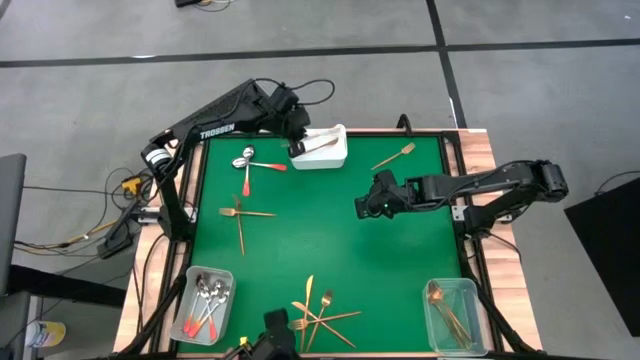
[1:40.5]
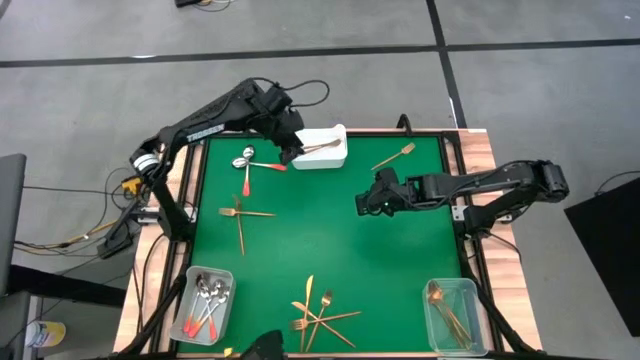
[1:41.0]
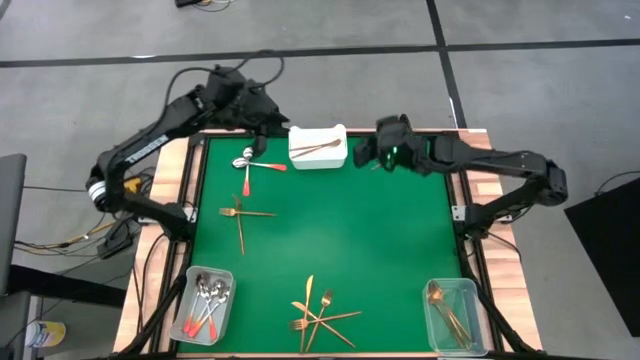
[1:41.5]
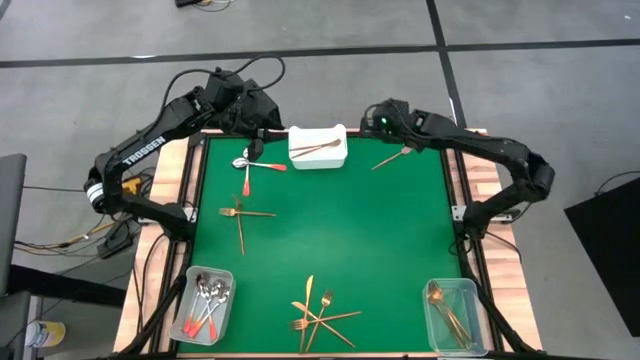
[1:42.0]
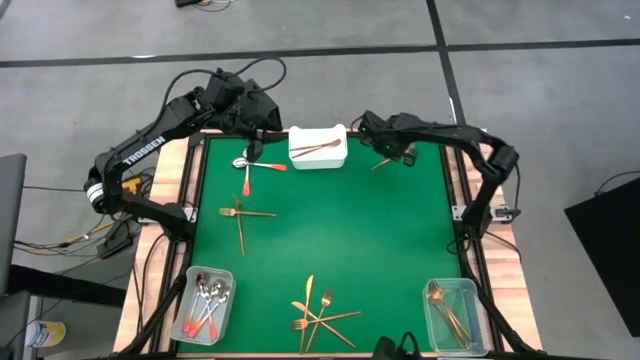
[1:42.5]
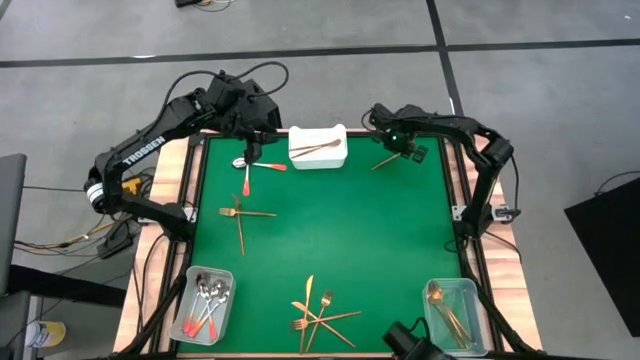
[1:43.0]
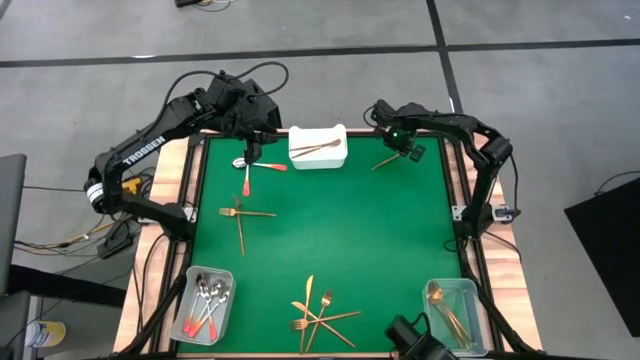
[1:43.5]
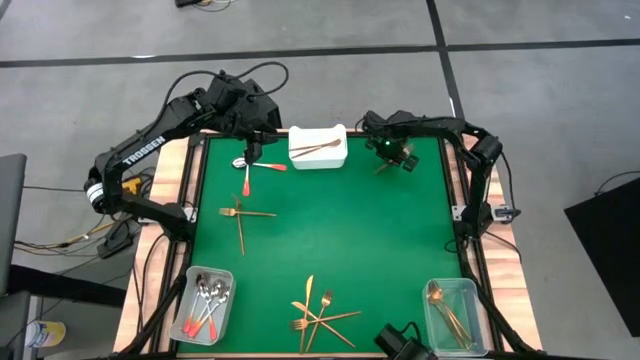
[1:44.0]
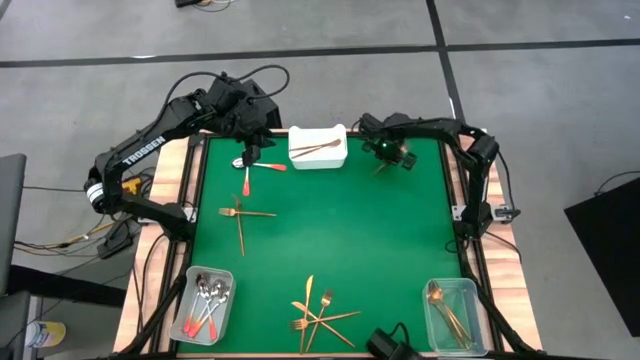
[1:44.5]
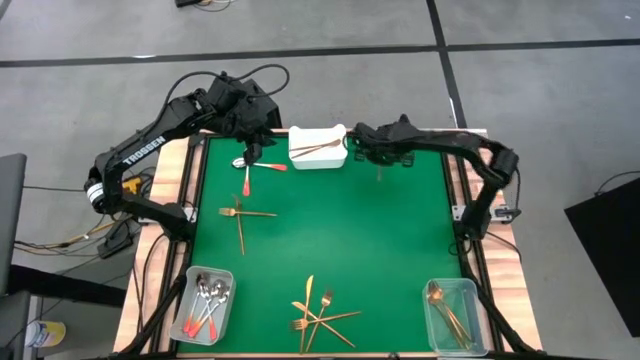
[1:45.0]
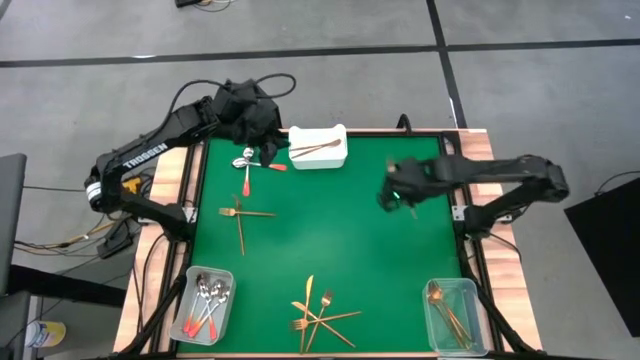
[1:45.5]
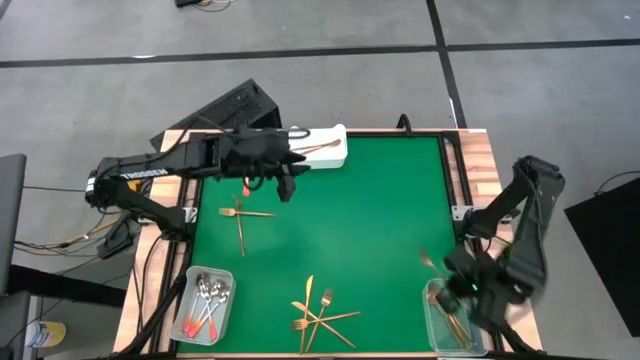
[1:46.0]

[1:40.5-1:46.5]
Task: Sort silverware by color (type)
Put the gold fork into the transparent bin

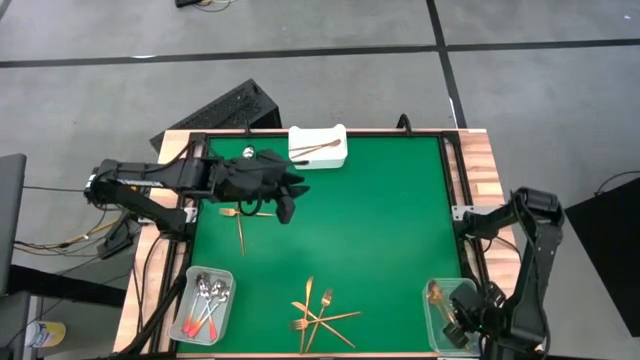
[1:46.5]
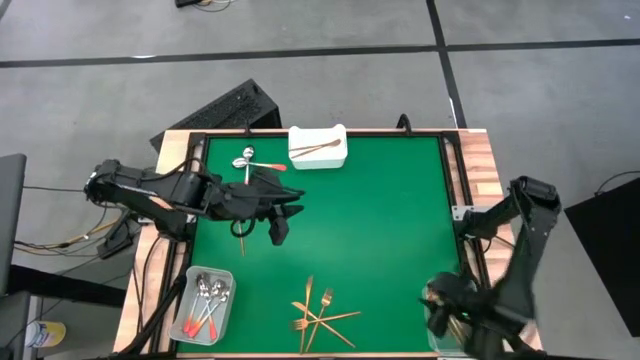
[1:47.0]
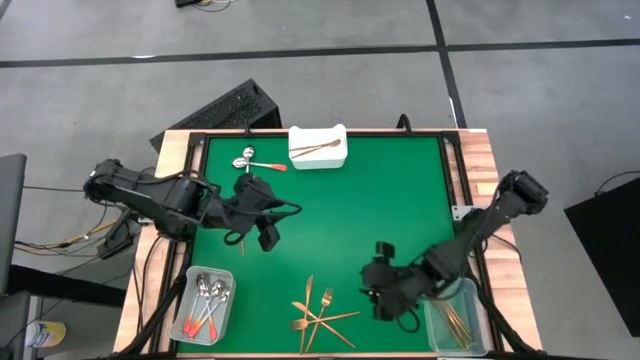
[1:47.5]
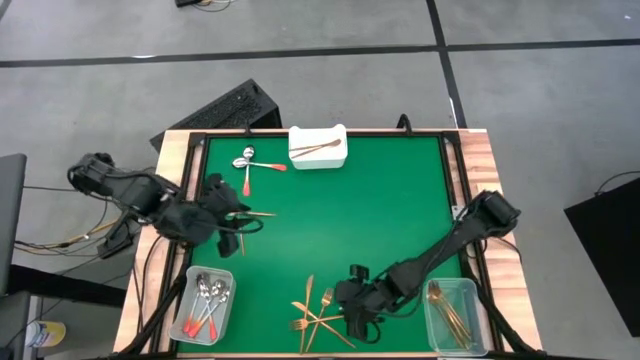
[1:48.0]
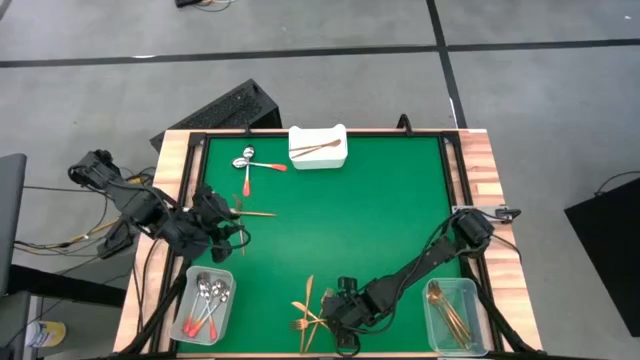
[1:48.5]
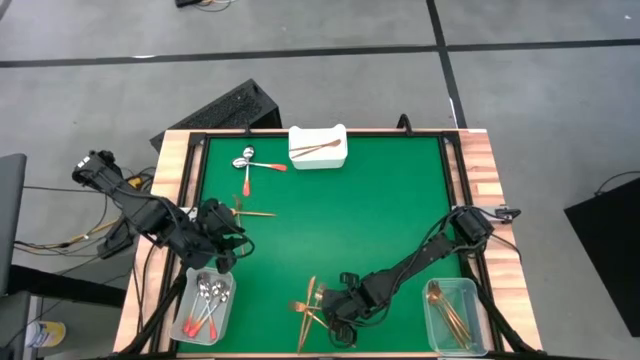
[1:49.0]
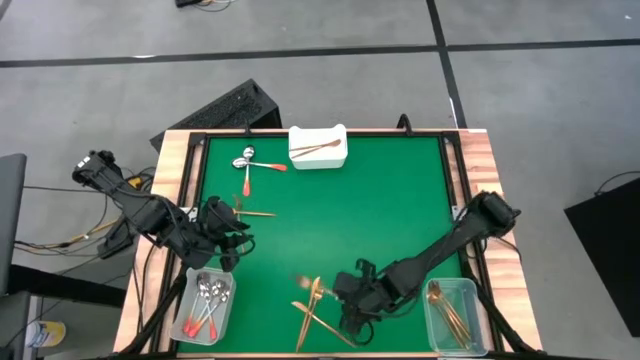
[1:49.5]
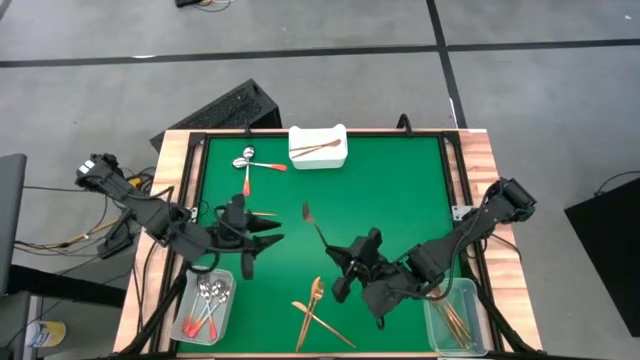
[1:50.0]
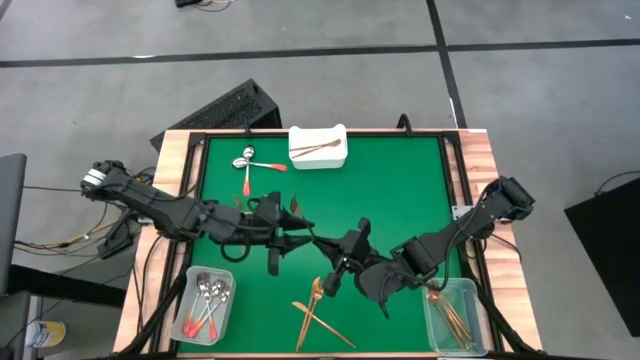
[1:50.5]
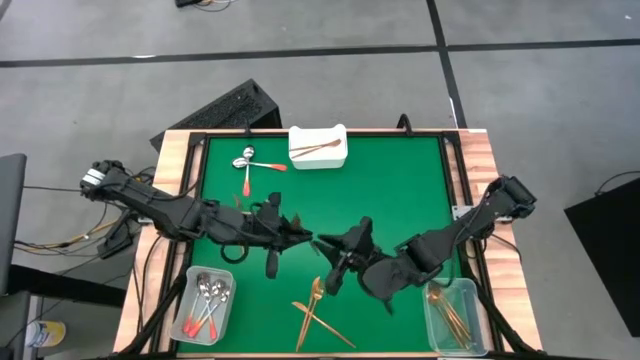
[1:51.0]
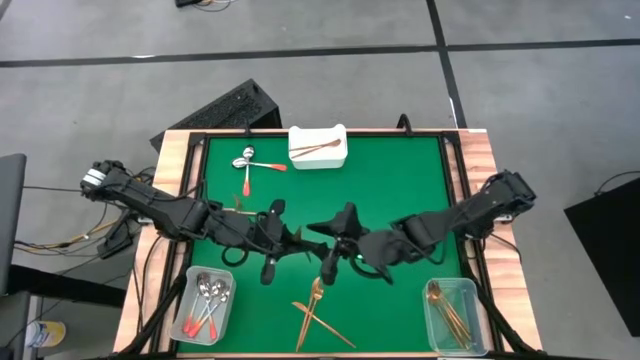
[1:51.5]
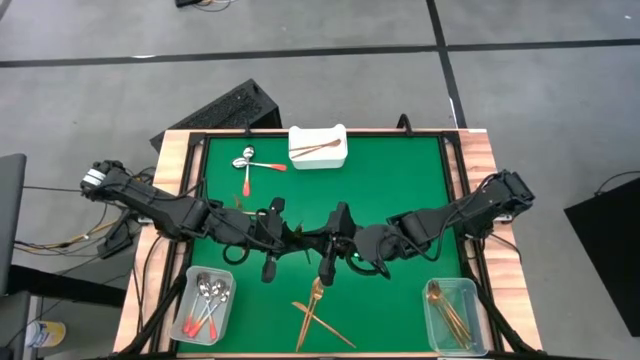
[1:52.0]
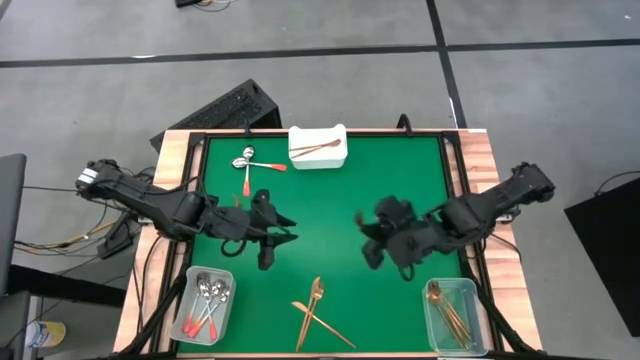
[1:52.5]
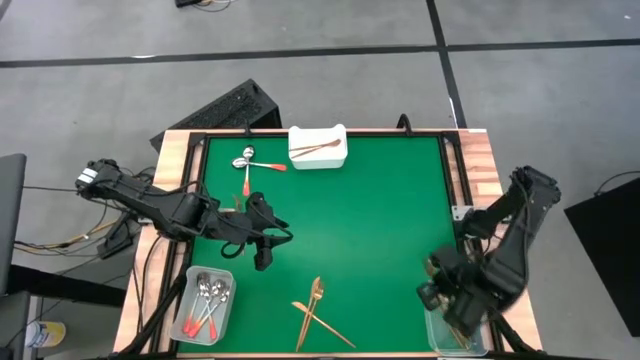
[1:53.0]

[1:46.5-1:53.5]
Put the gold fork into the transparent bin

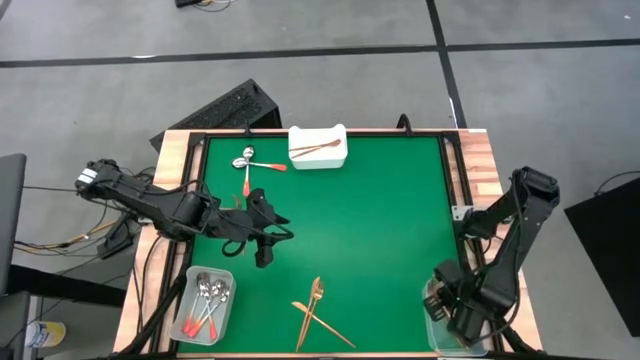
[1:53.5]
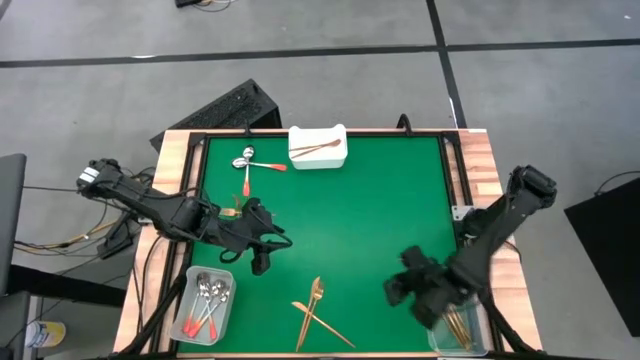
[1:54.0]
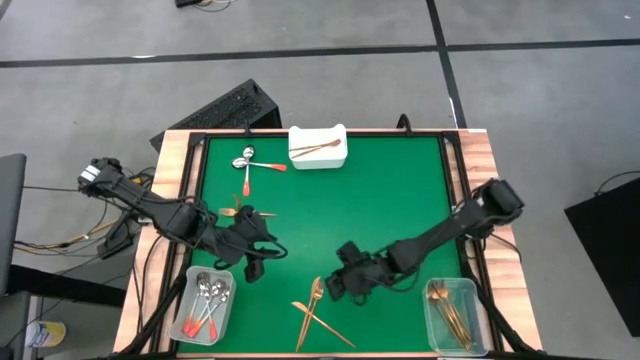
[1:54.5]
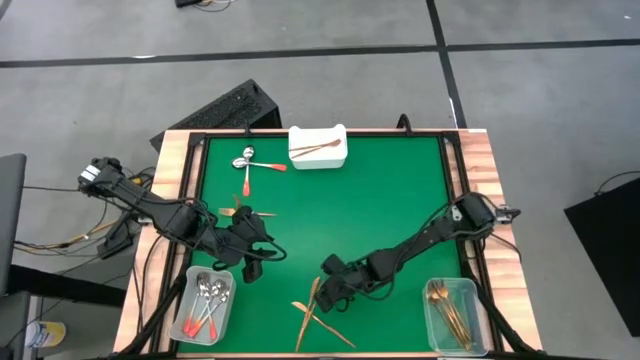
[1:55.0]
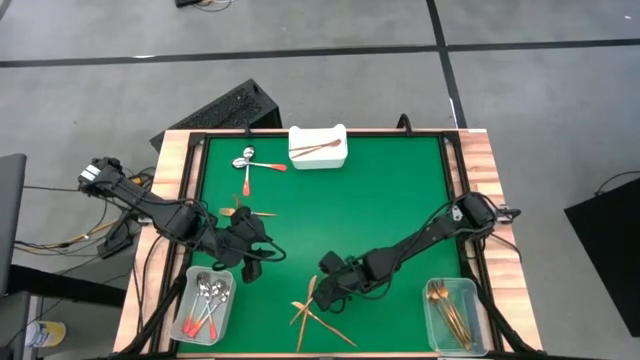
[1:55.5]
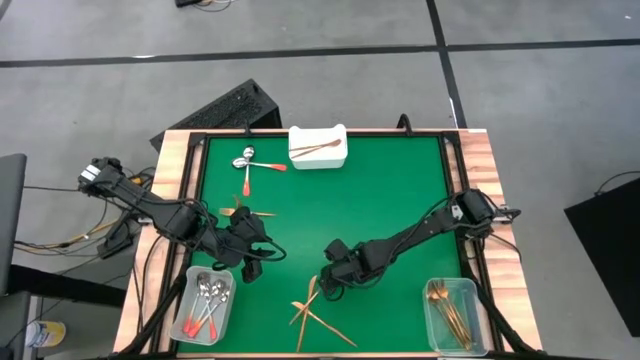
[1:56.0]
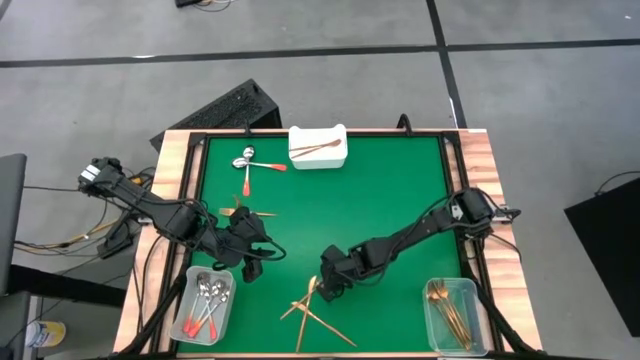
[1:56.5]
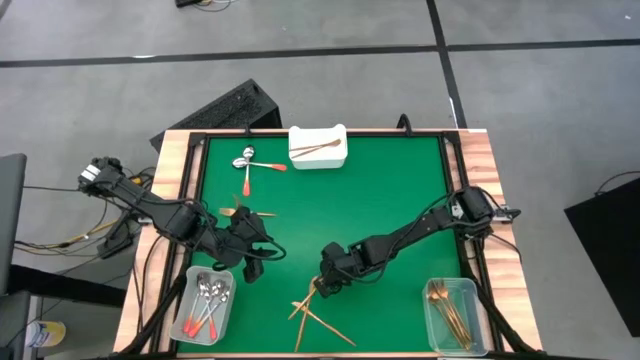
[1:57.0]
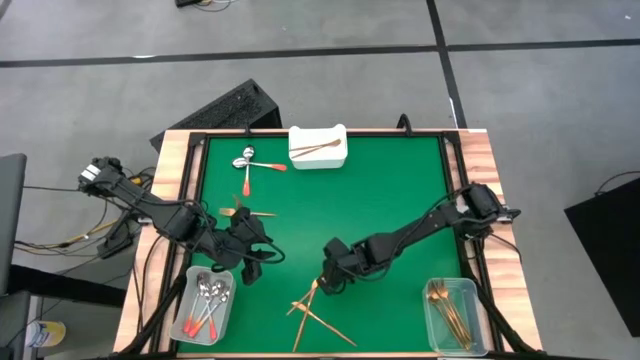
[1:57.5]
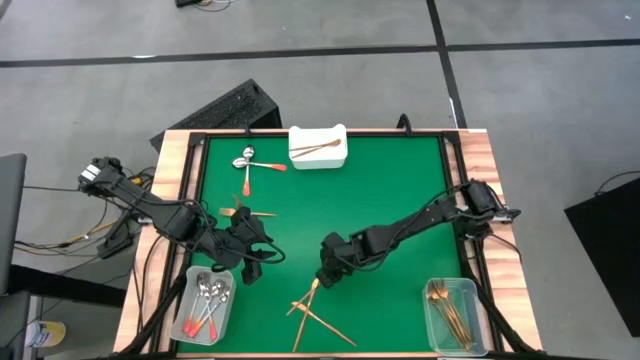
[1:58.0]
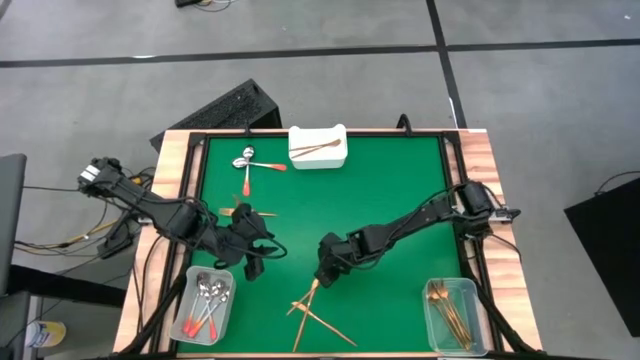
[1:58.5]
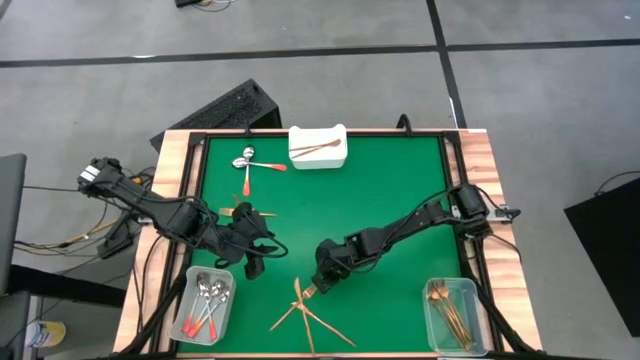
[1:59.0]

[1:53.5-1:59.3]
Put the gold fork into the transparent bin

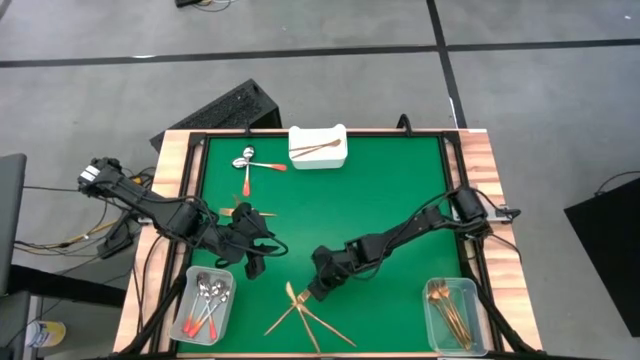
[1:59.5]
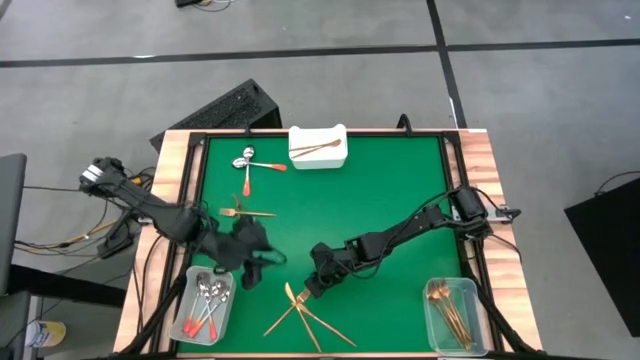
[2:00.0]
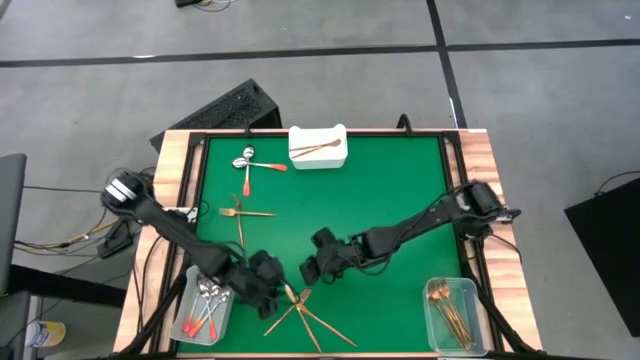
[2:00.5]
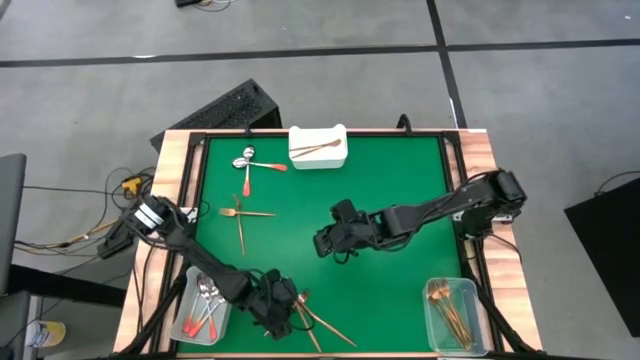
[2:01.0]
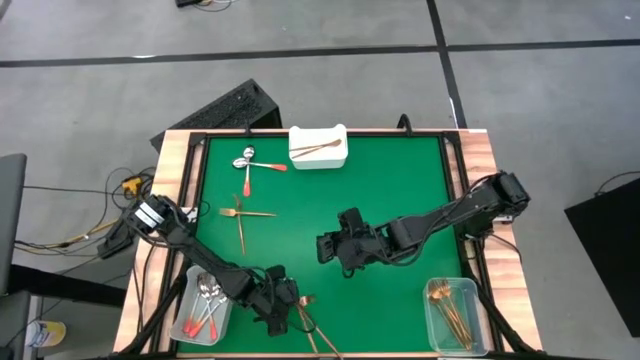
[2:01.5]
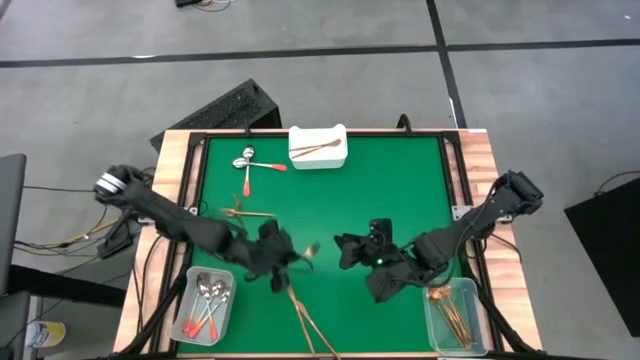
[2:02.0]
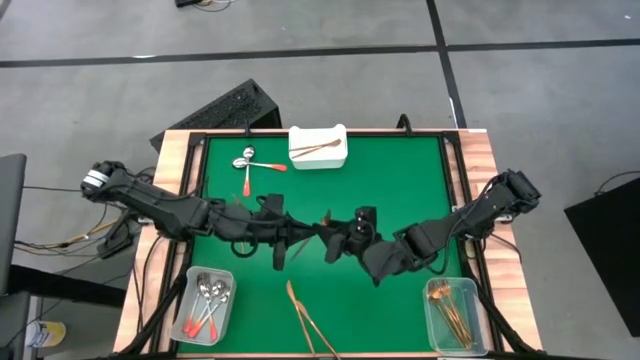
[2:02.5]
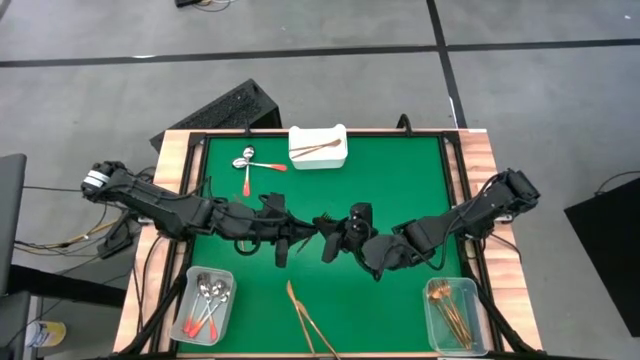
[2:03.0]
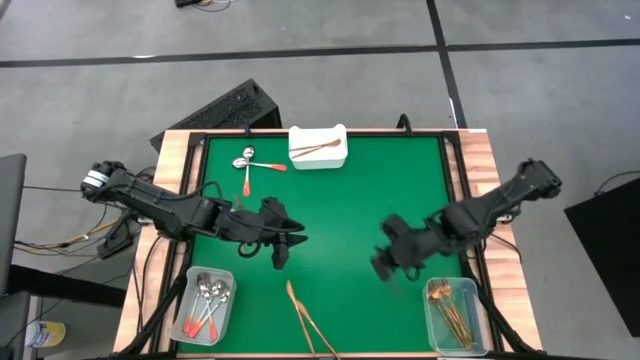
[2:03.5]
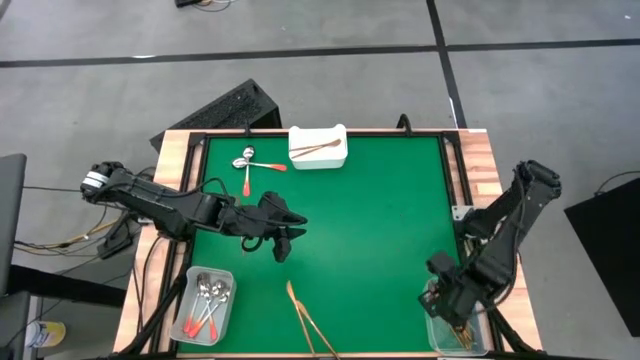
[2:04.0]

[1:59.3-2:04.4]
Put the gold fork into the transparent bin
